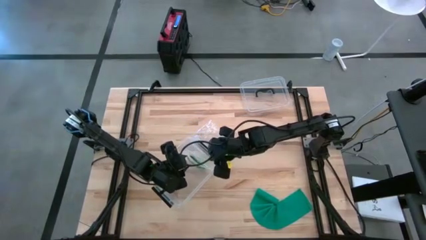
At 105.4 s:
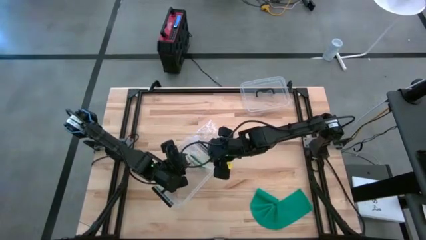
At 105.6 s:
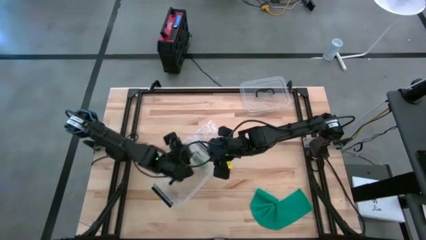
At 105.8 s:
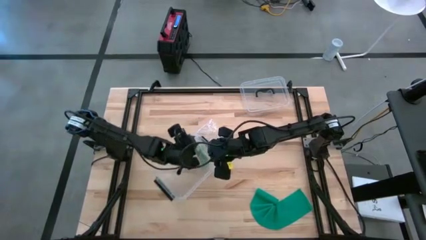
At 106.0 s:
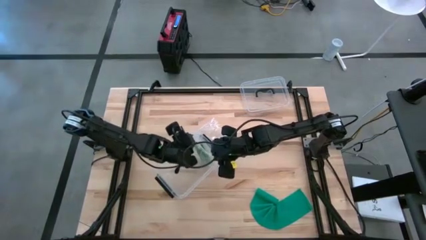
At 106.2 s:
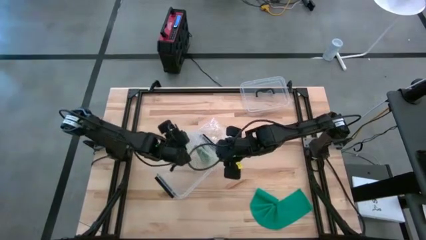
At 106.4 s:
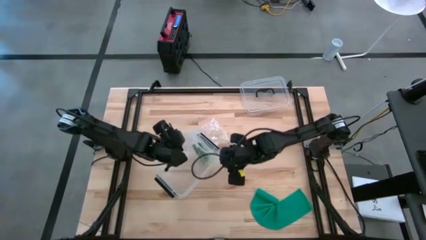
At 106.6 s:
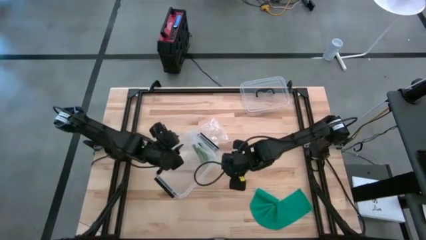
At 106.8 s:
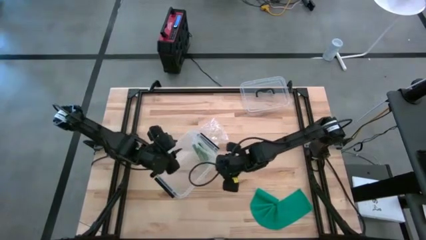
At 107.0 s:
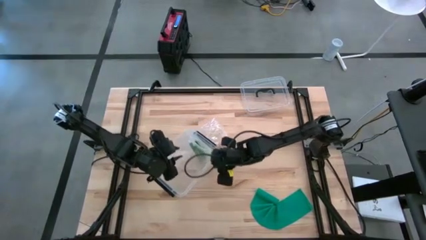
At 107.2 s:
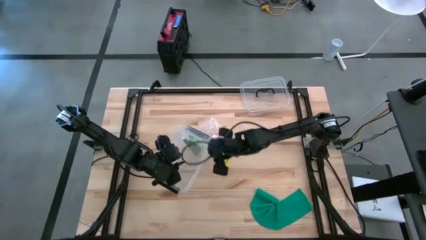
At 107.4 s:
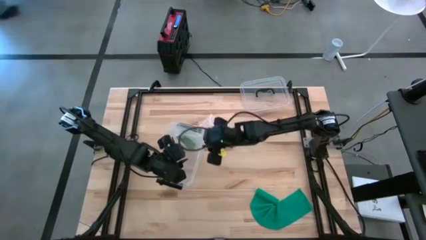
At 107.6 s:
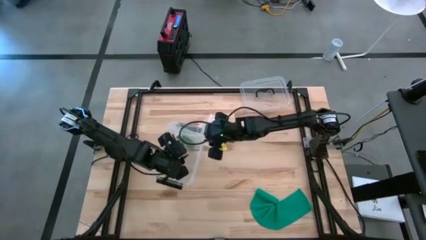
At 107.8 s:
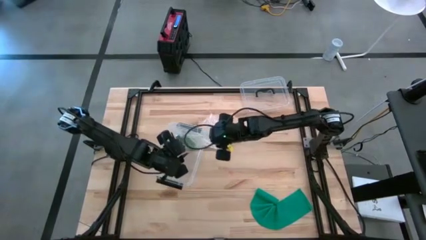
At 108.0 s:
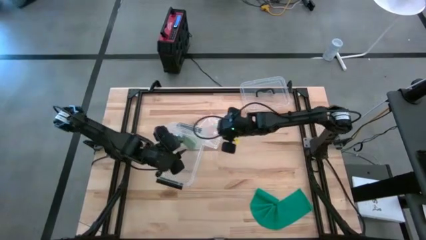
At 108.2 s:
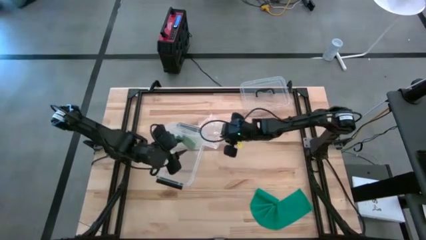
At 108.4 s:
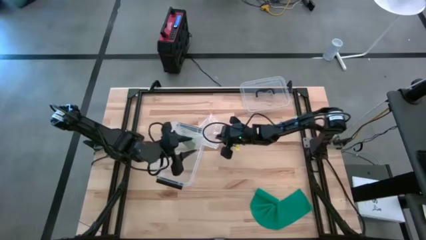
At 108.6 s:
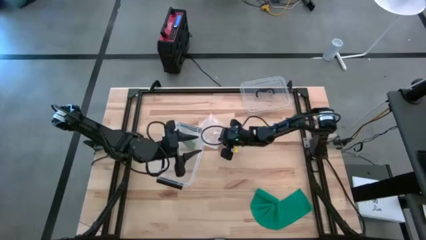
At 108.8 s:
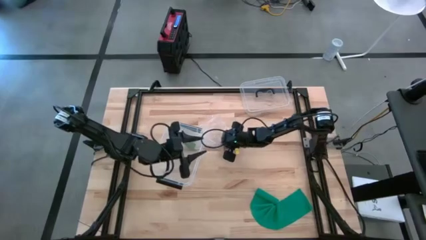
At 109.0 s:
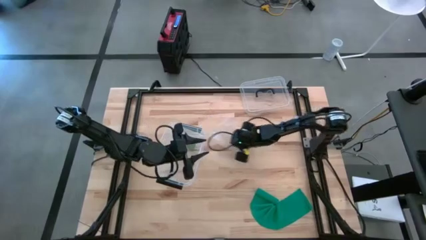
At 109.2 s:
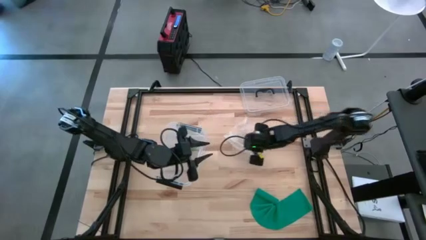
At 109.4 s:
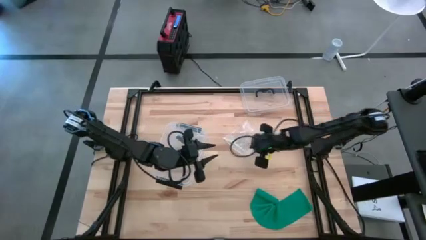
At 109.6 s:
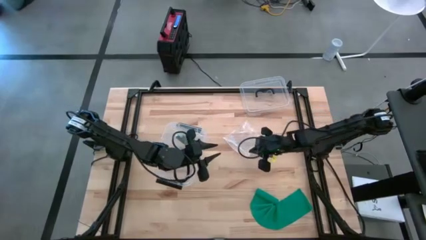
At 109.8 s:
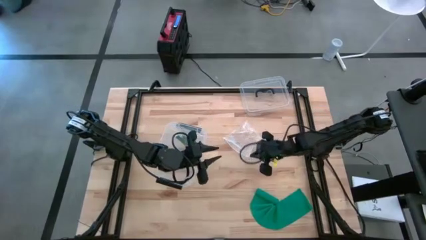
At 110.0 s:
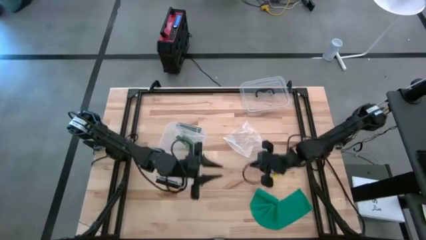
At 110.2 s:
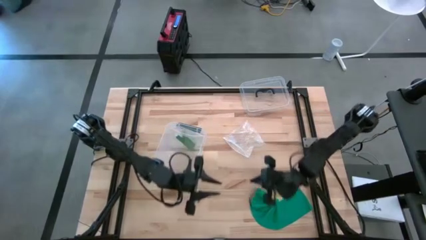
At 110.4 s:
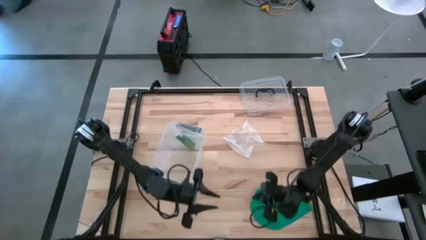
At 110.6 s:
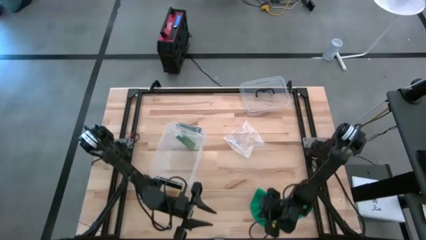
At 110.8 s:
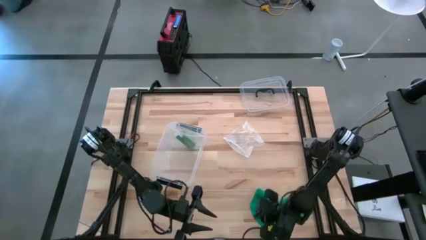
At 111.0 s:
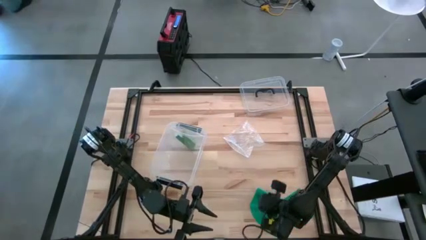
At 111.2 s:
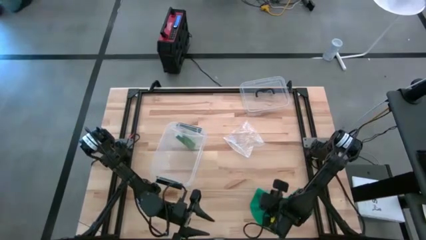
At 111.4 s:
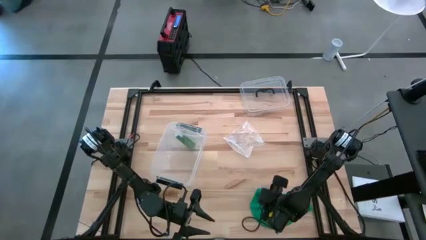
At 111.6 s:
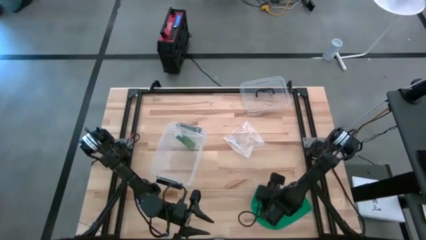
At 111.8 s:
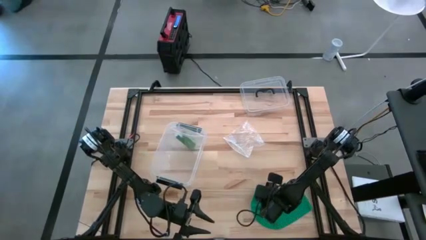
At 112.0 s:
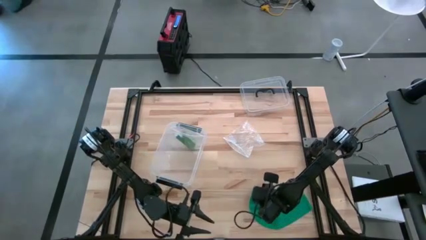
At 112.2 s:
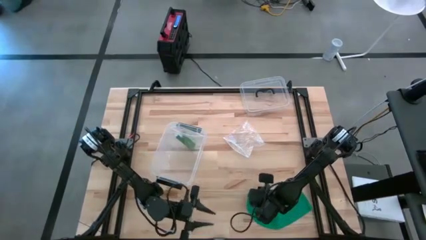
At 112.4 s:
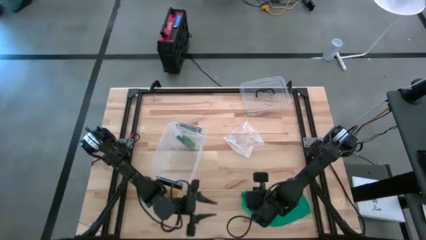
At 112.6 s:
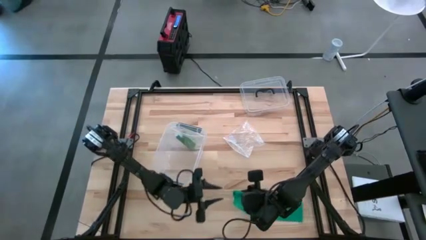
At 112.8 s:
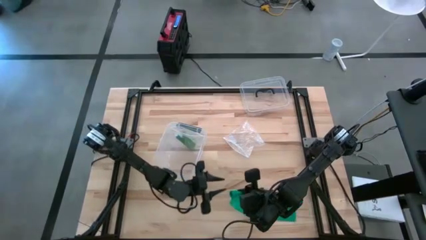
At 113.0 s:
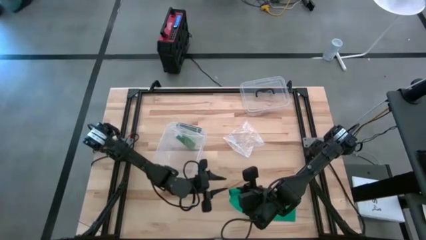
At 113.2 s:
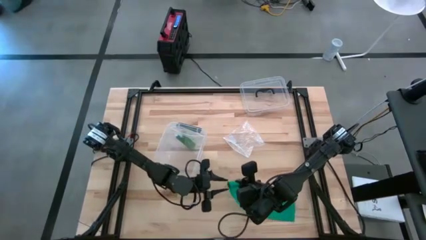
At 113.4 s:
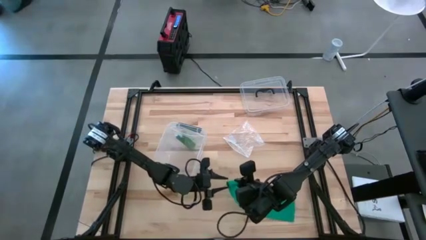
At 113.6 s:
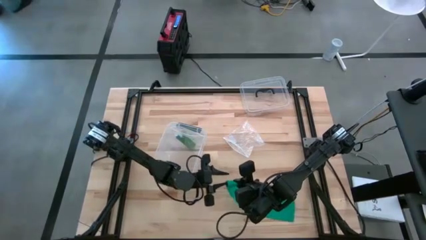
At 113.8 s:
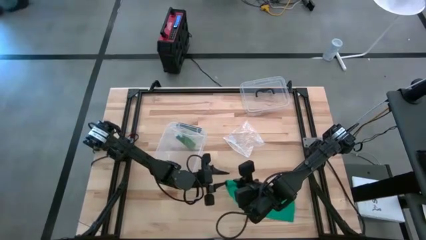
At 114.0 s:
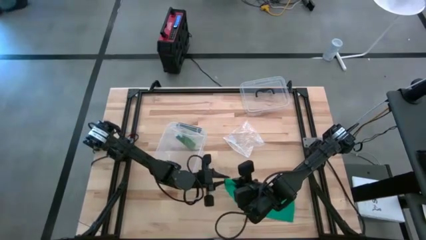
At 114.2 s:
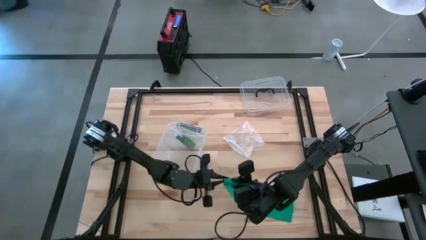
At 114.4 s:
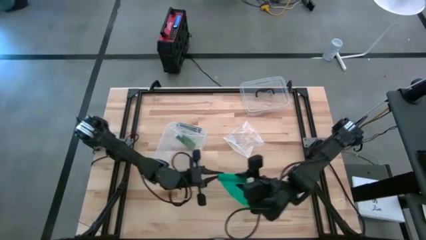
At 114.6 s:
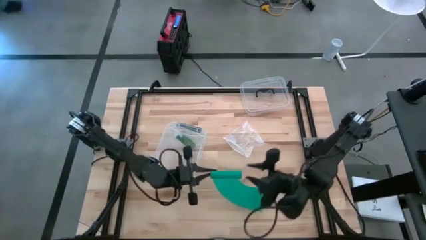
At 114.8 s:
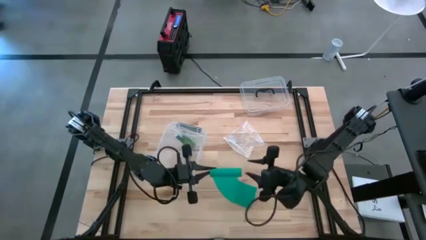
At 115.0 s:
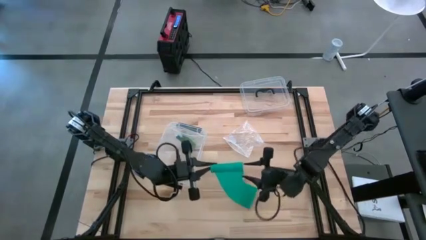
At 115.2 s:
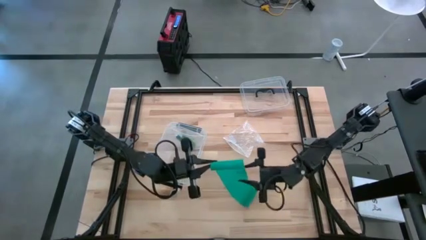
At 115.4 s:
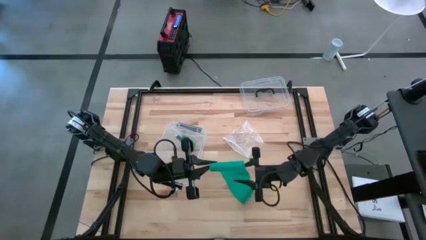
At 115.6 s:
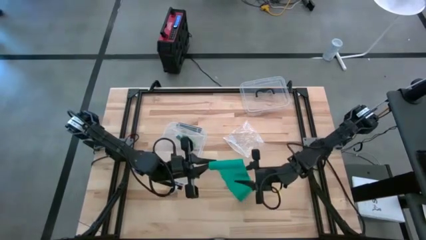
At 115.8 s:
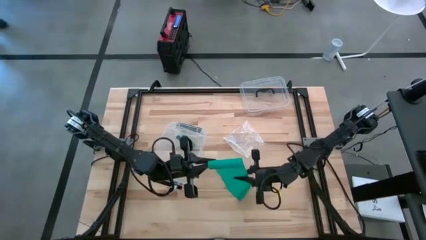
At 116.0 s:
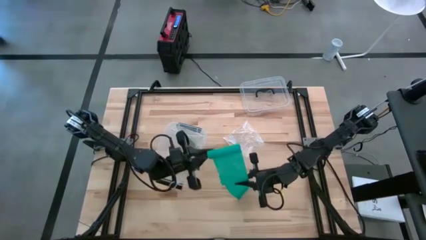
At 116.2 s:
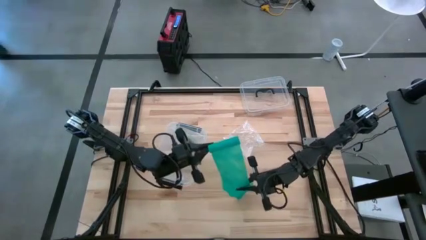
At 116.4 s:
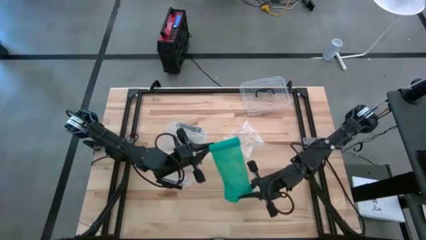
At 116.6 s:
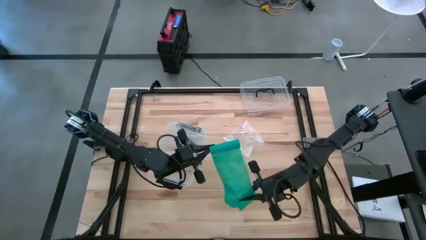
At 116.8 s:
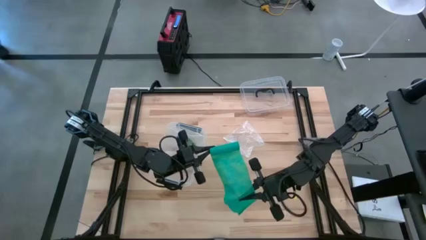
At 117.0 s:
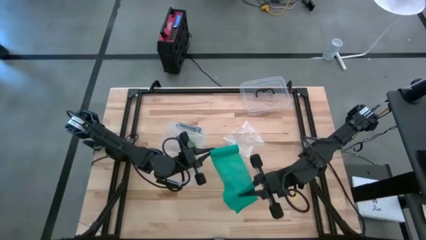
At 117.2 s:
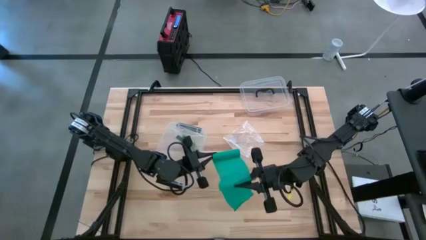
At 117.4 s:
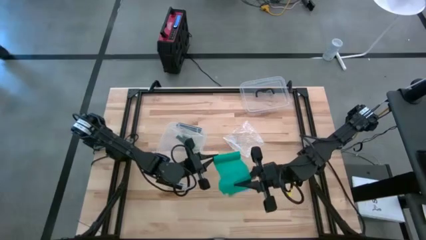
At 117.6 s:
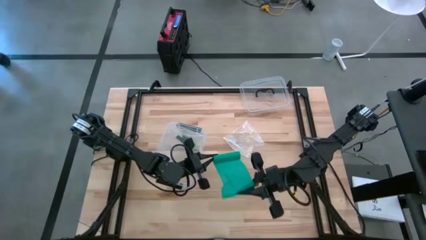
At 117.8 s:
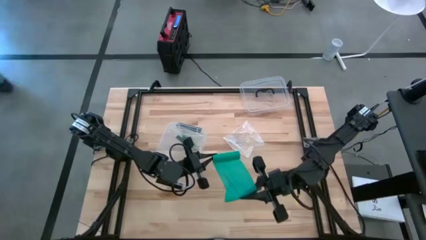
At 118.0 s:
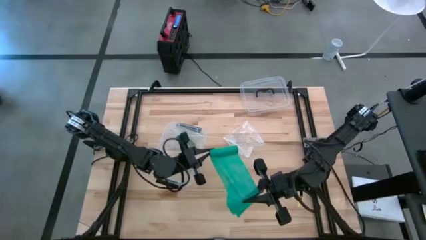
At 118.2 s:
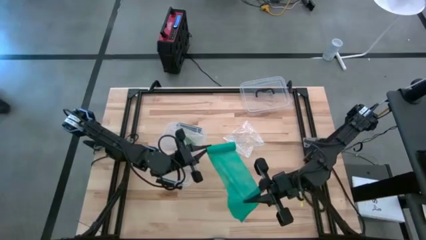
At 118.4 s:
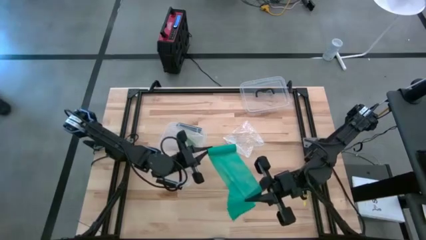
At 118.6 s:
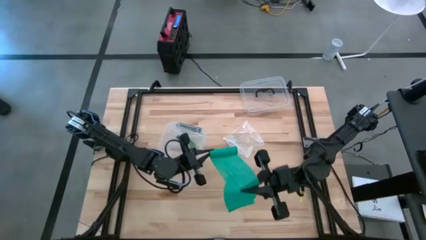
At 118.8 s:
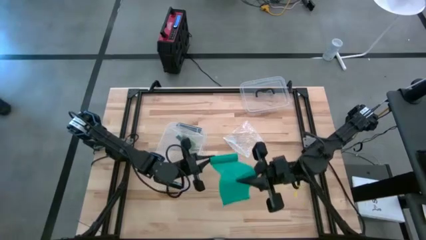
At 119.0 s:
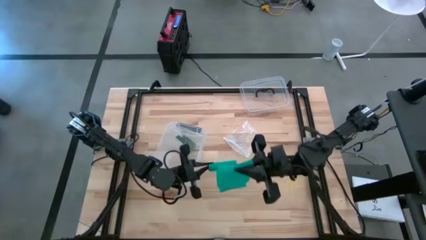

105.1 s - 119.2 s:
Task: Roll bandage
Roll the blue bandage

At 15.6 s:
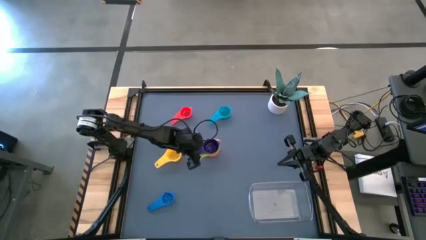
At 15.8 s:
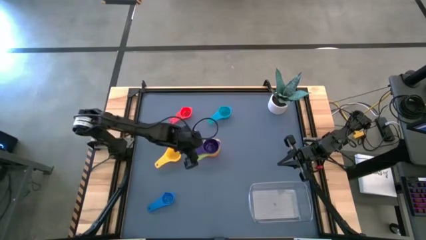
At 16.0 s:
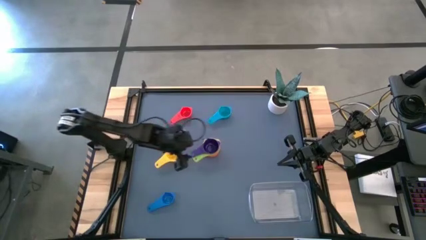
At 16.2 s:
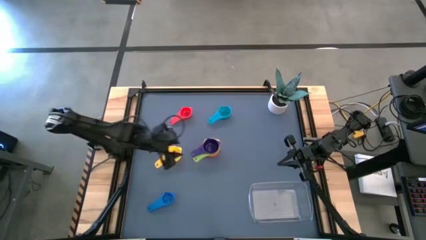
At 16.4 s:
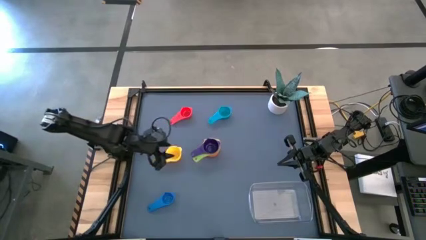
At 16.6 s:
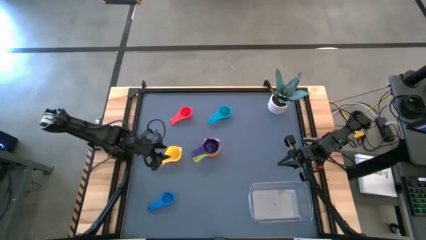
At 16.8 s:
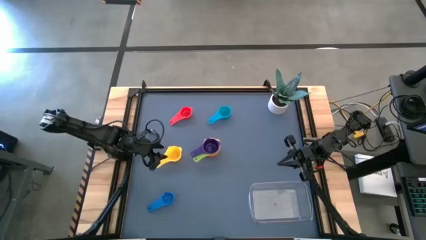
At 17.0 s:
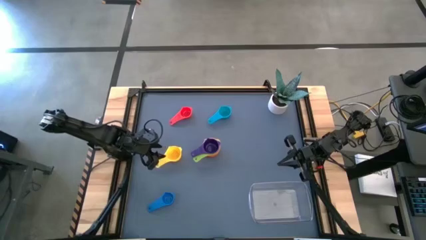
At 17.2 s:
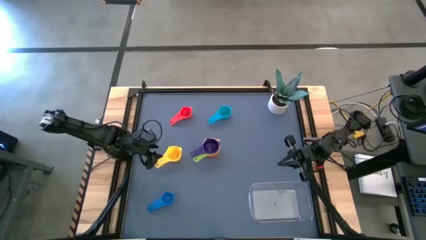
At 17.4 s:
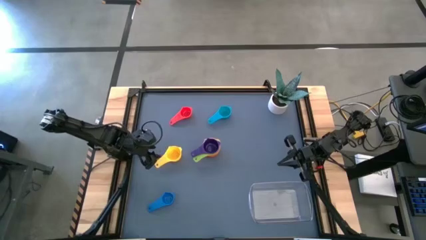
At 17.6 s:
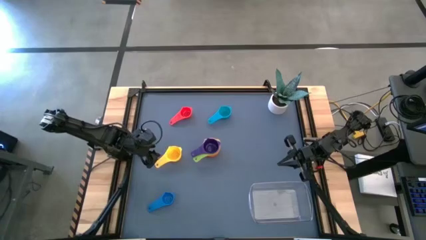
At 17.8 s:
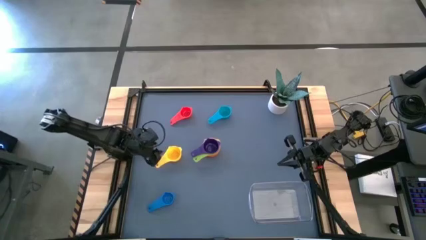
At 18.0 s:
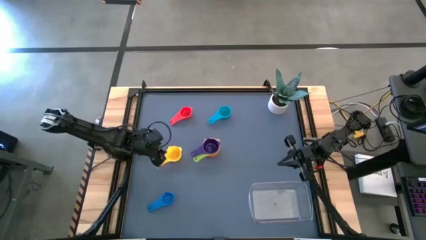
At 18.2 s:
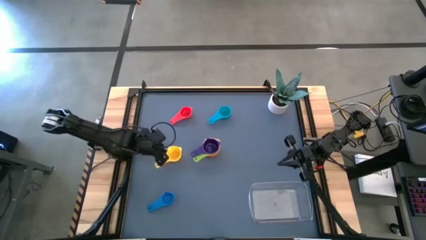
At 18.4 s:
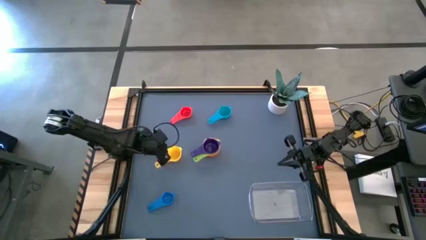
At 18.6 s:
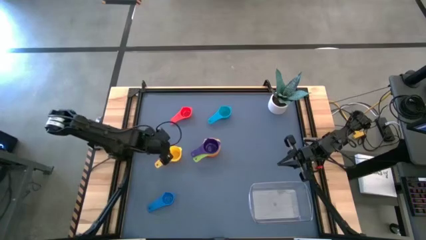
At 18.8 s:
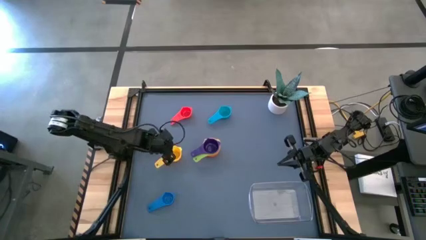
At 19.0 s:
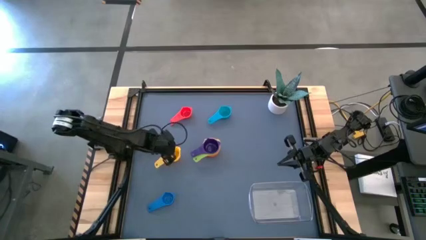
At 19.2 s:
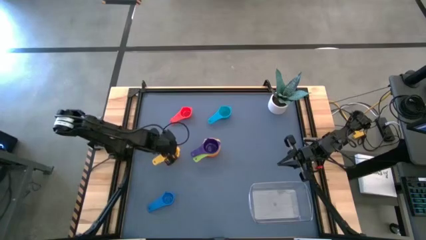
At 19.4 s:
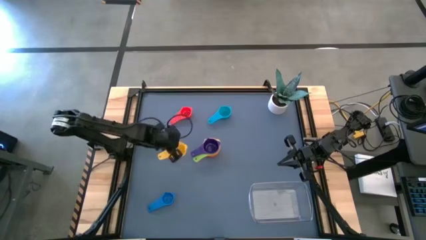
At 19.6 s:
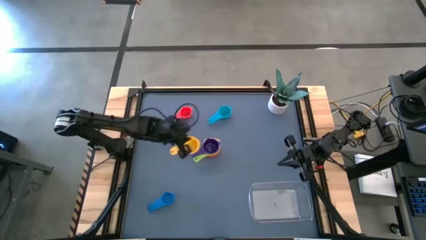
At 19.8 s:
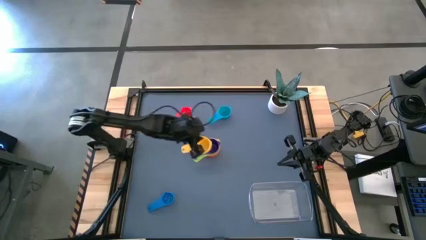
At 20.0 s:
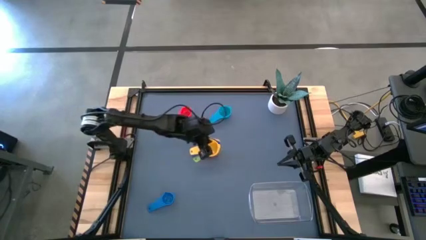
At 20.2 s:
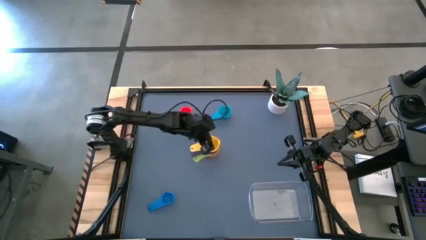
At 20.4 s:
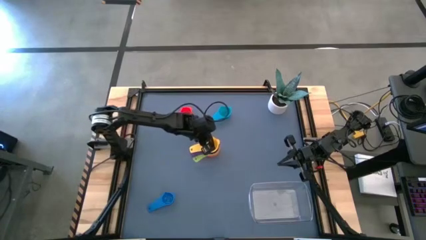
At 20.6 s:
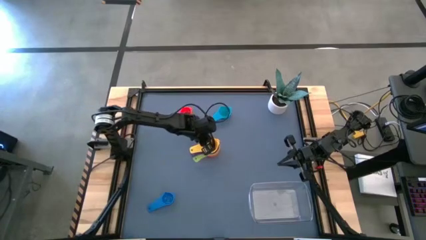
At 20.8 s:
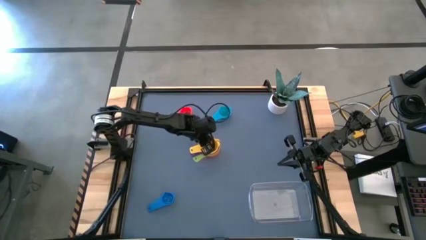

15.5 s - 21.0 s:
Task: Nest measuring cups in basket
Stack the yellow measuring cup on top of the violet measuring cup
